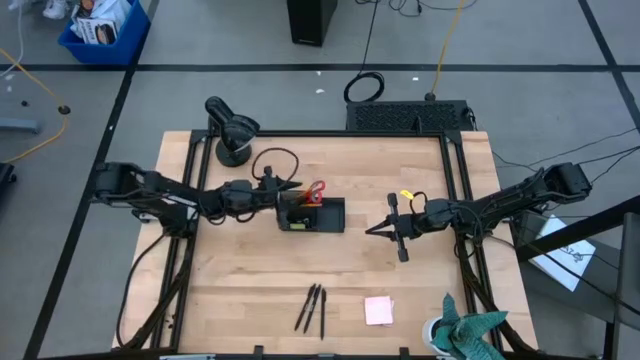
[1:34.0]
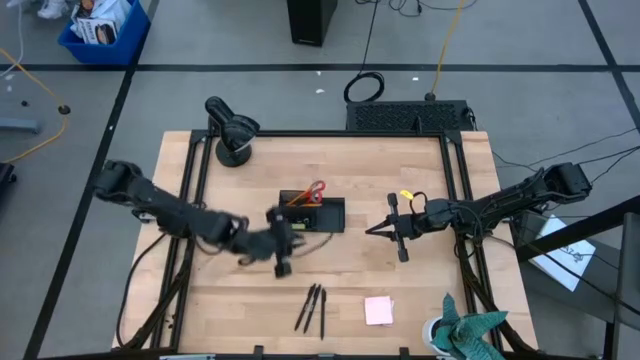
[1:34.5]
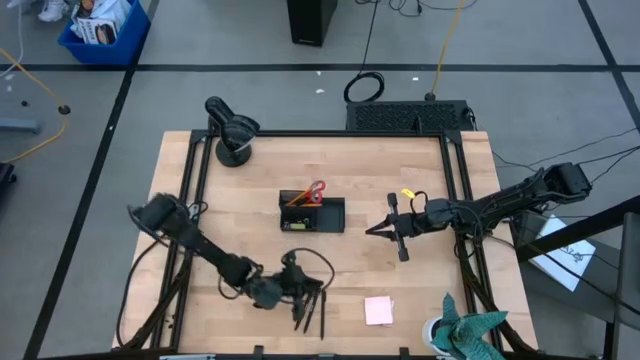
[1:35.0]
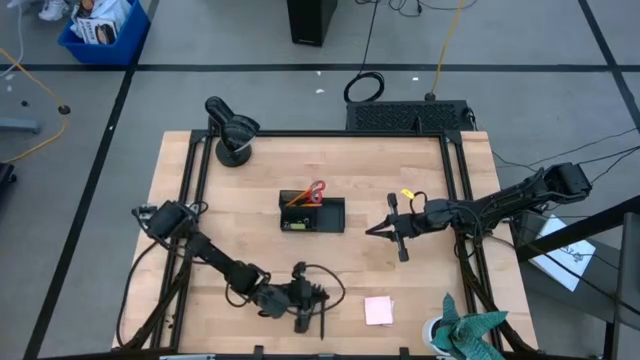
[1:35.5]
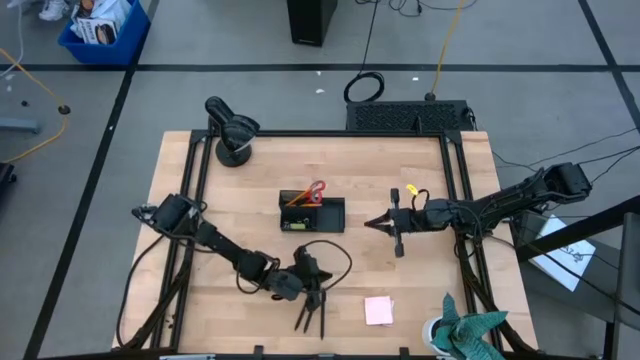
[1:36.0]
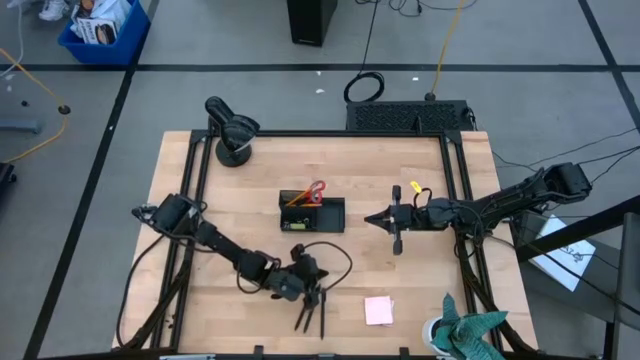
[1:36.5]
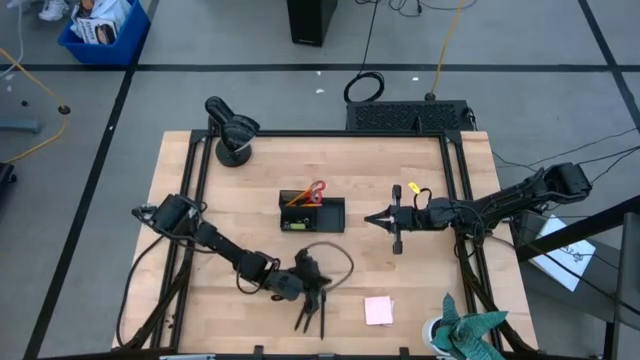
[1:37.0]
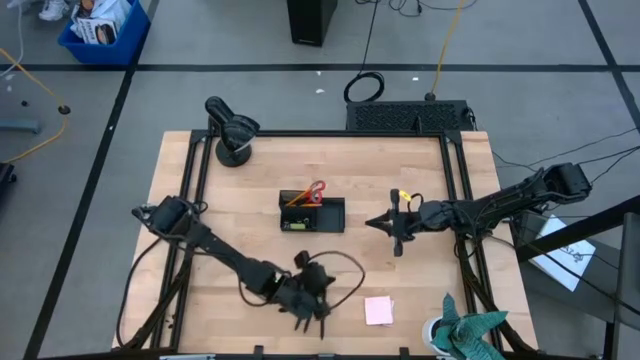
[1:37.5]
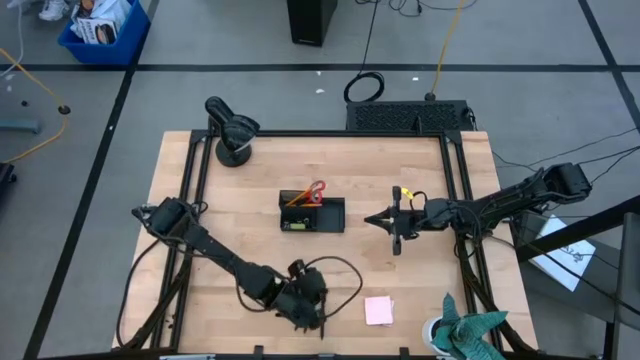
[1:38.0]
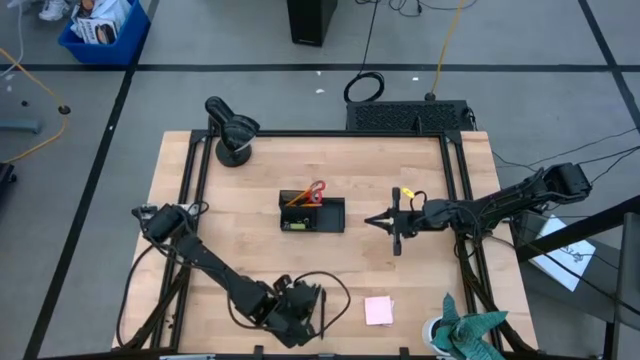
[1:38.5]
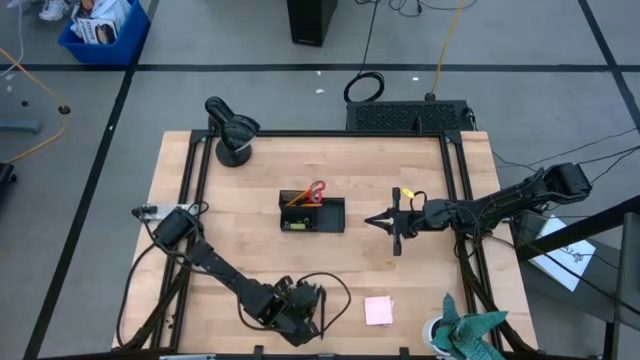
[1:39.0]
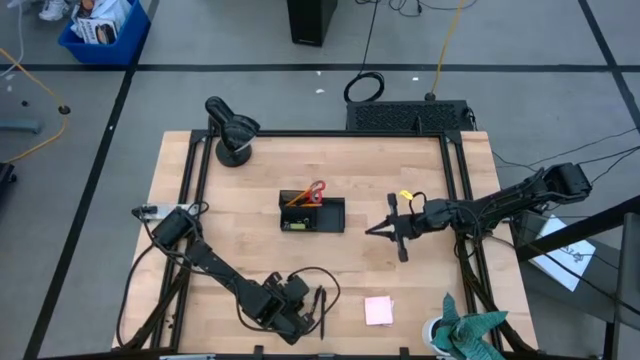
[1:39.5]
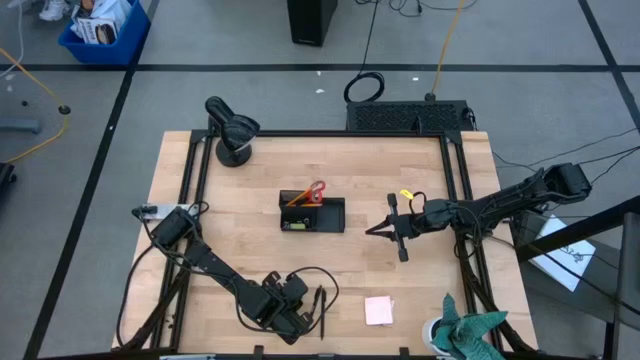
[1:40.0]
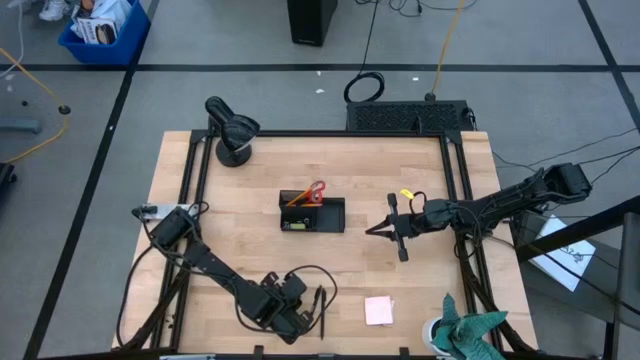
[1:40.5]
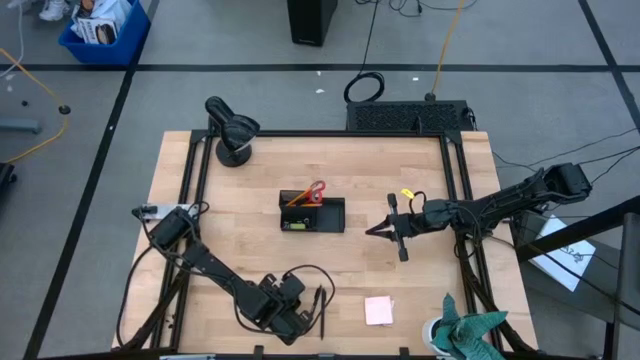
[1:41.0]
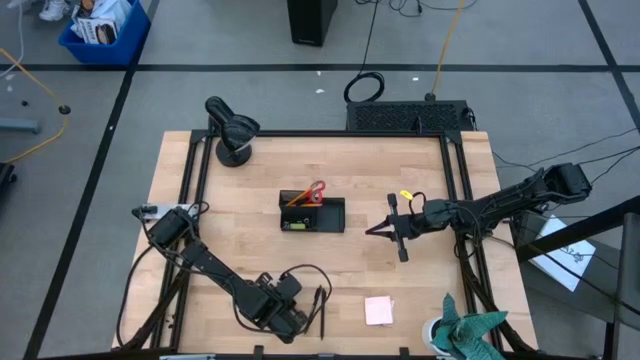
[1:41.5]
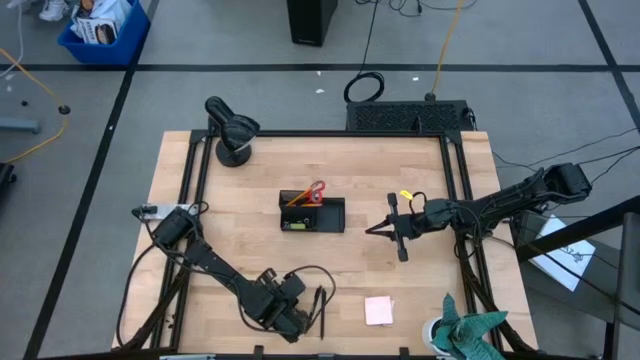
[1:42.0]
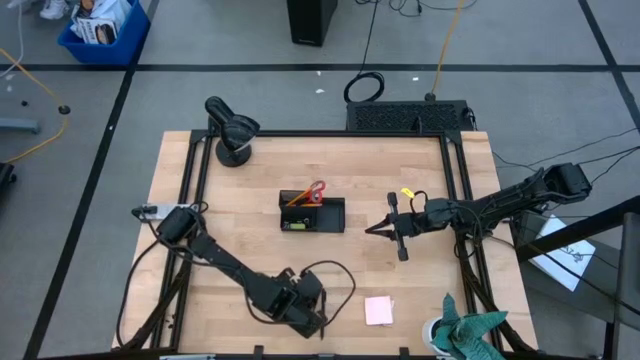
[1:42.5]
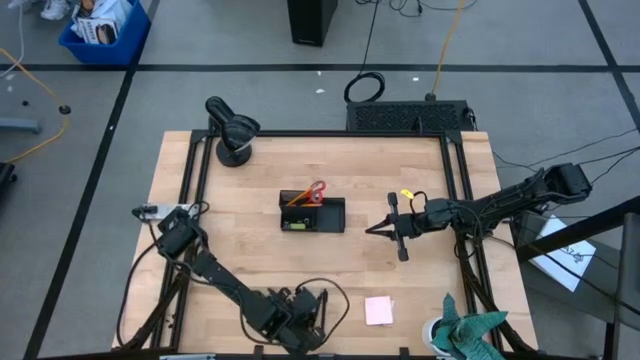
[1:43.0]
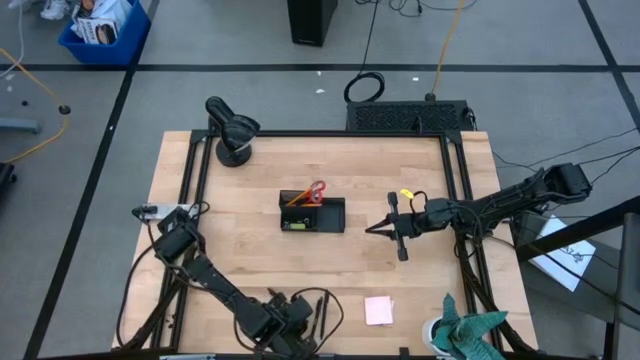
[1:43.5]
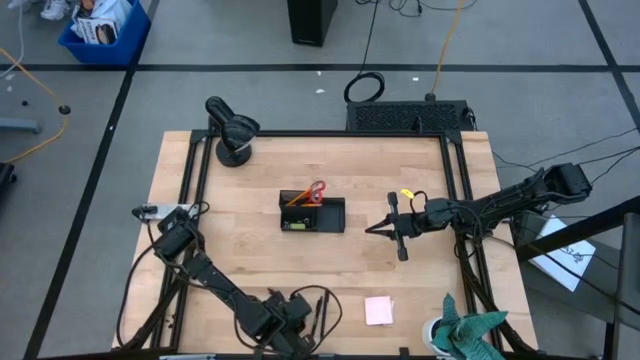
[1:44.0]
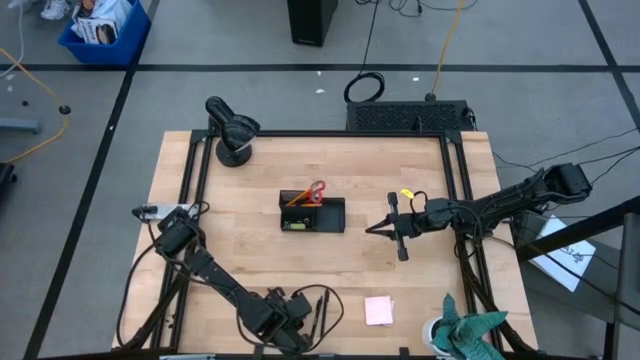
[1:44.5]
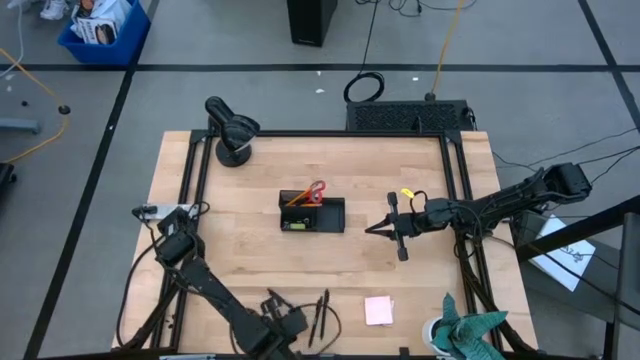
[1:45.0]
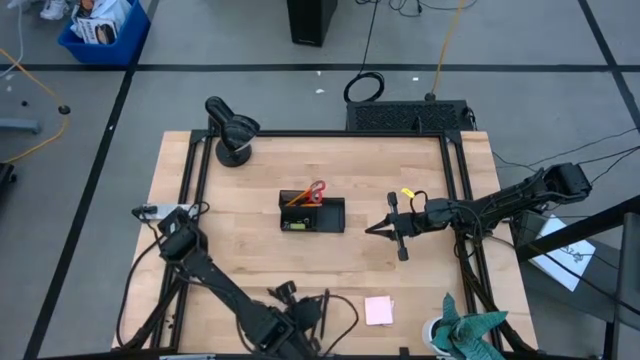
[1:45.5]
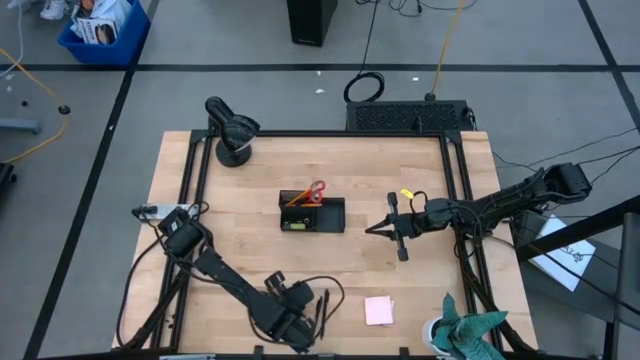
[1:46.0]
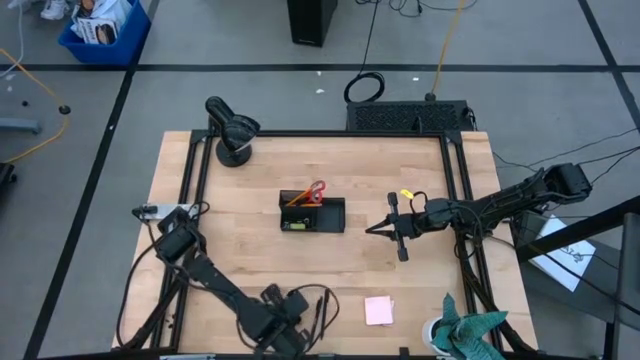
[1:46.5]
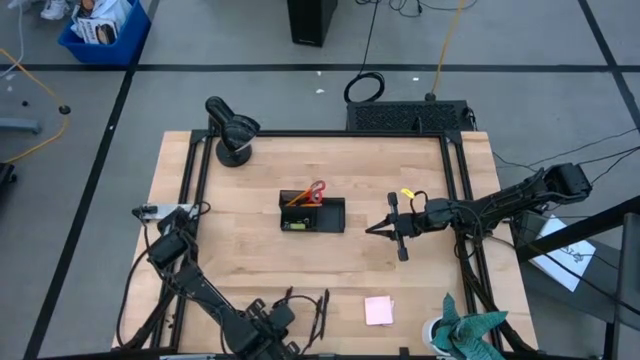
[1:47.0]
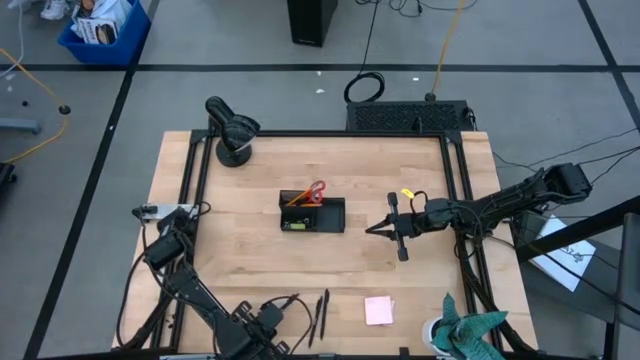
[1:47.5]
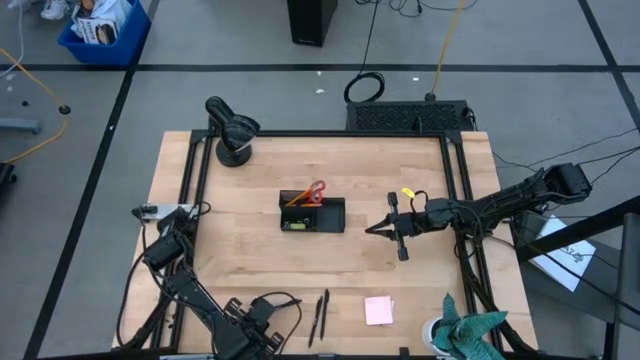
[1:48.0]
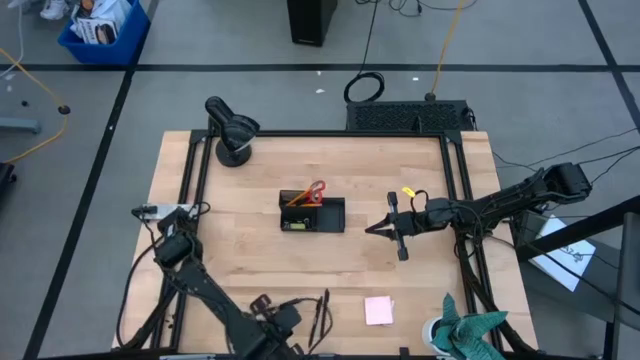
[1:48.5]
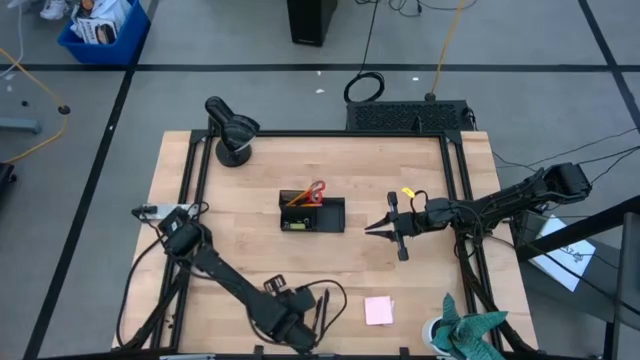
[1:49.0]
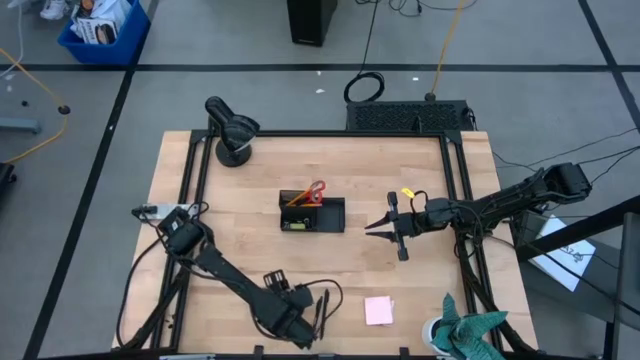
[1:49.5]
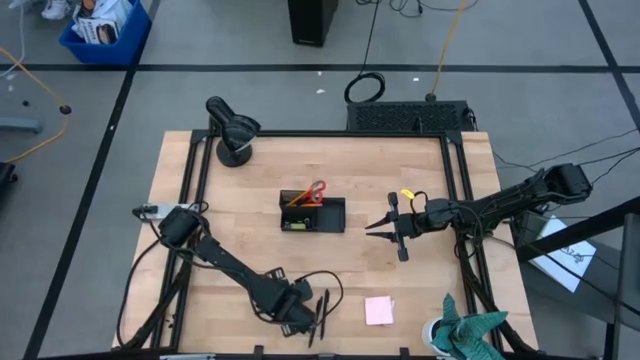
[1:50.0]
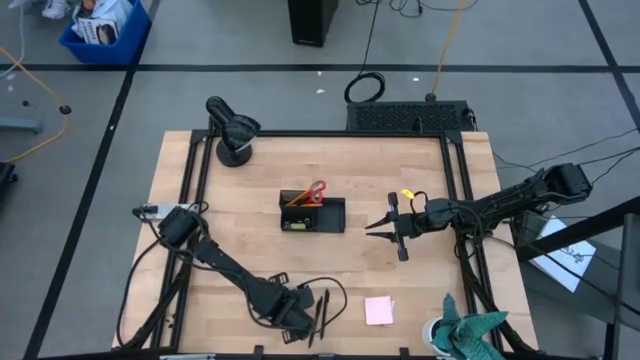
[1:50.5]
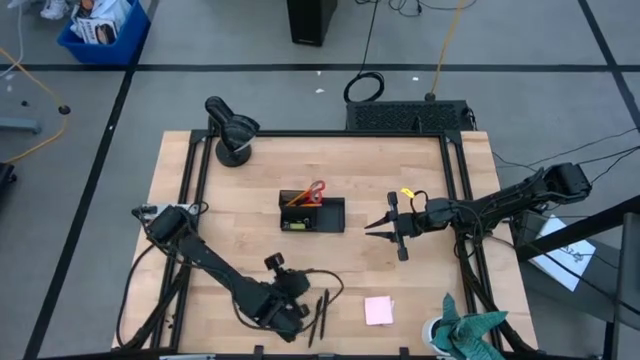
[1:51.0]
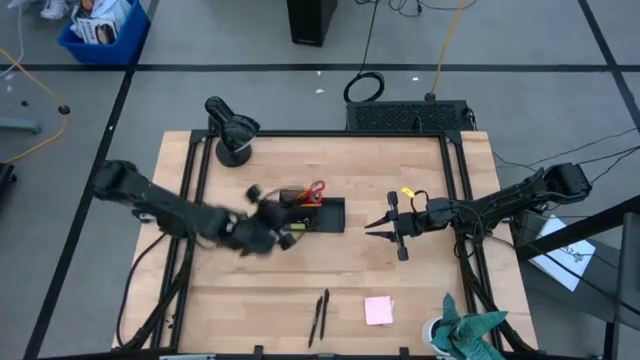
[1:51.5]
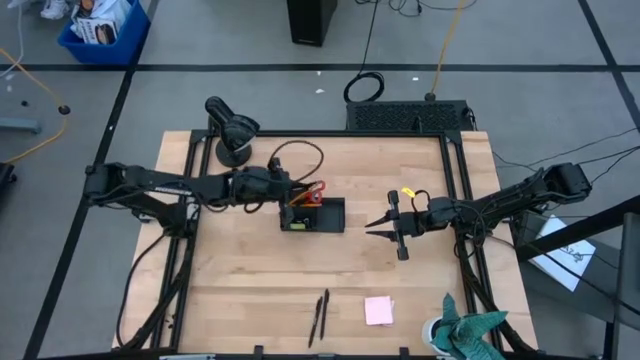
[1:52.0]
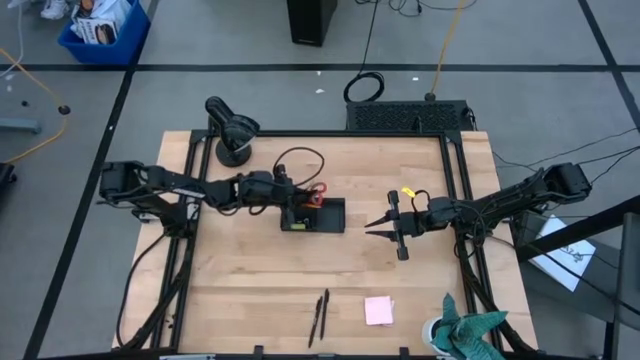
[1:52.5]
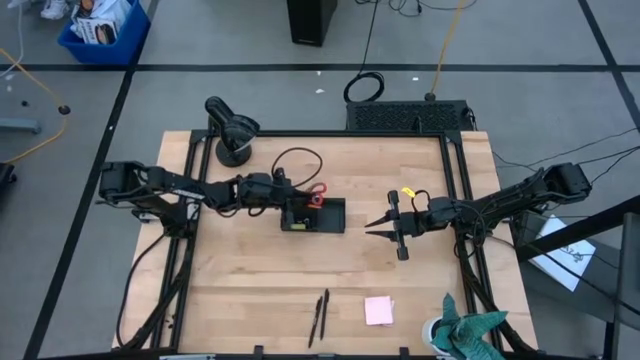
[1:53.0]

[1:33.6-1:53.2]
Task: Pick and place office supplies into organizer
Put the black pen into the black desk organizer
